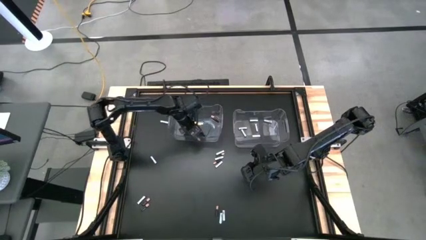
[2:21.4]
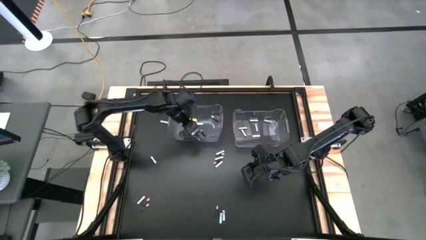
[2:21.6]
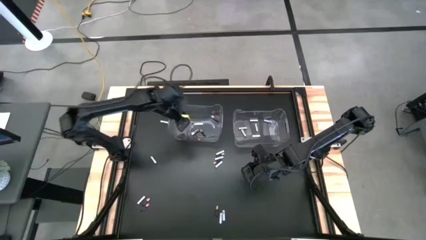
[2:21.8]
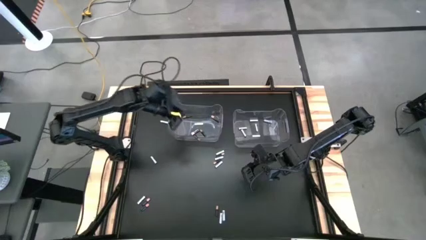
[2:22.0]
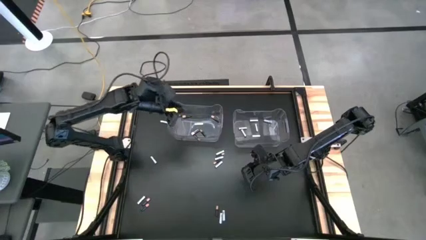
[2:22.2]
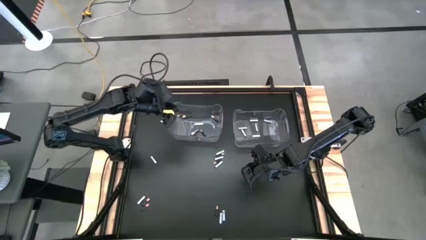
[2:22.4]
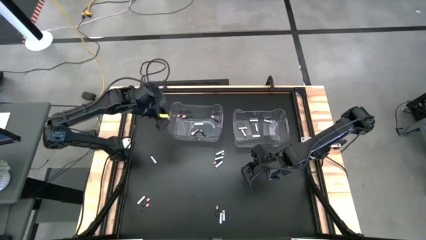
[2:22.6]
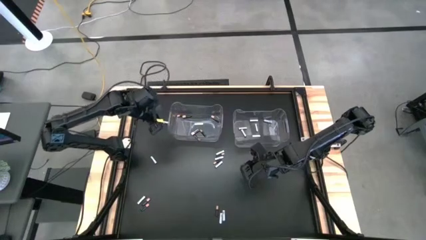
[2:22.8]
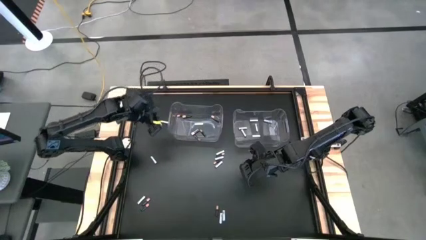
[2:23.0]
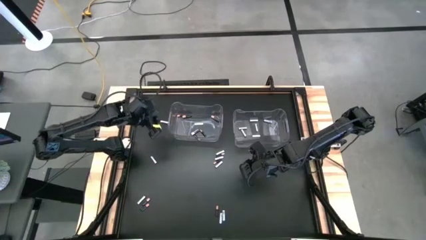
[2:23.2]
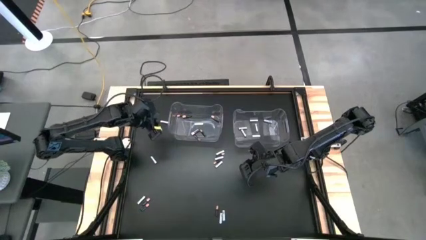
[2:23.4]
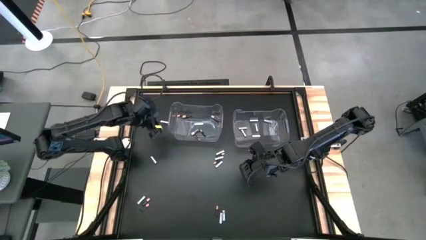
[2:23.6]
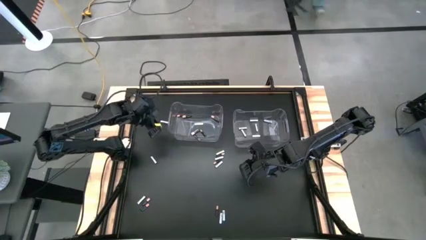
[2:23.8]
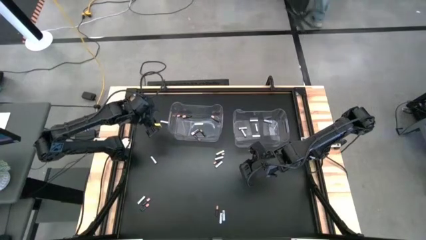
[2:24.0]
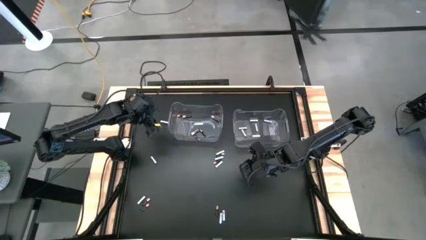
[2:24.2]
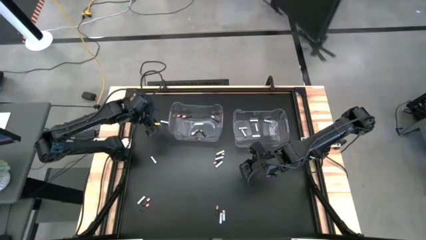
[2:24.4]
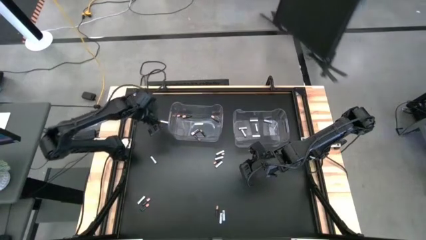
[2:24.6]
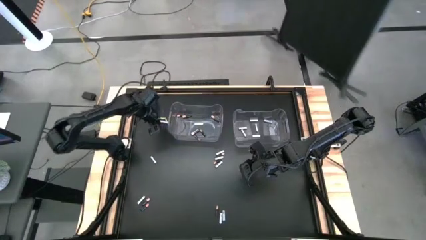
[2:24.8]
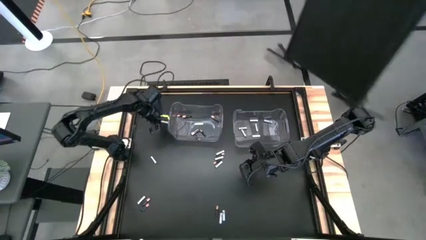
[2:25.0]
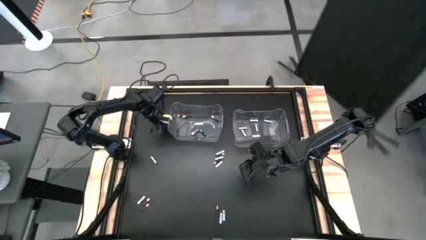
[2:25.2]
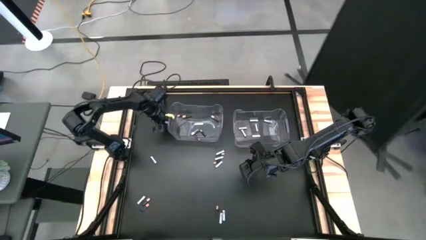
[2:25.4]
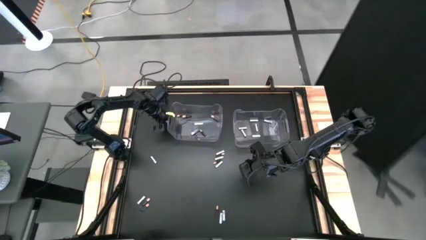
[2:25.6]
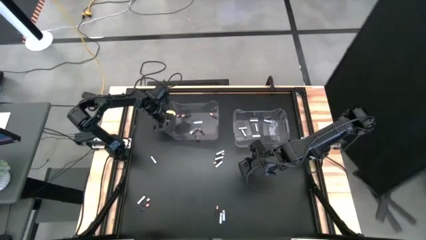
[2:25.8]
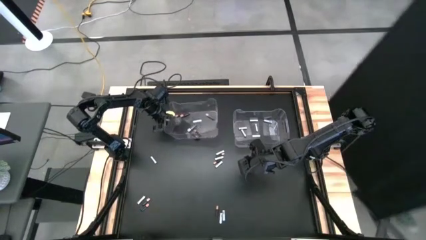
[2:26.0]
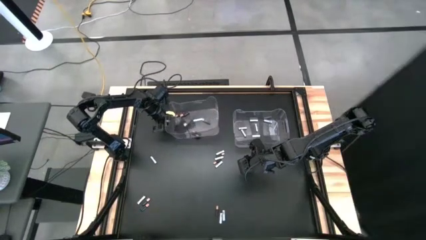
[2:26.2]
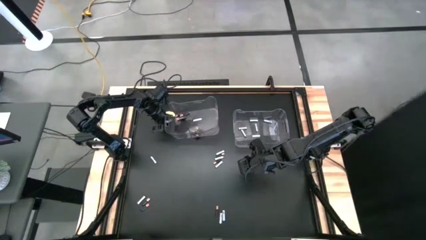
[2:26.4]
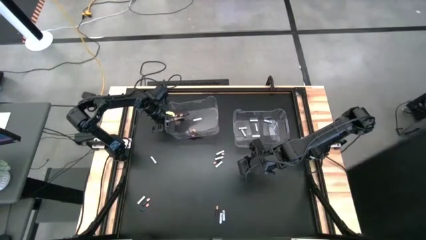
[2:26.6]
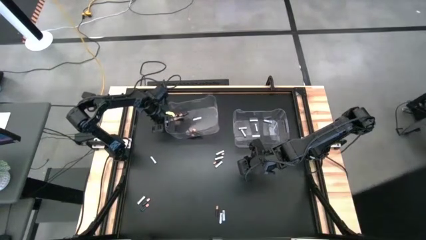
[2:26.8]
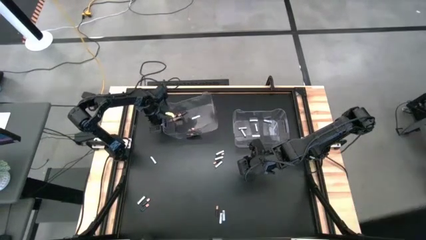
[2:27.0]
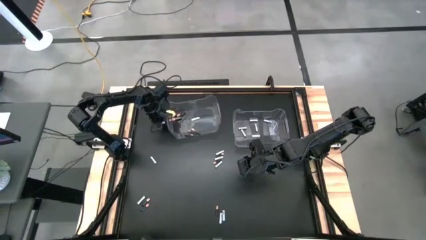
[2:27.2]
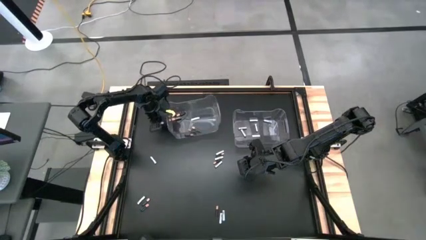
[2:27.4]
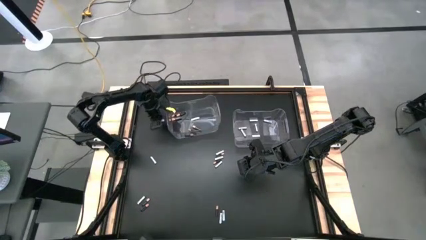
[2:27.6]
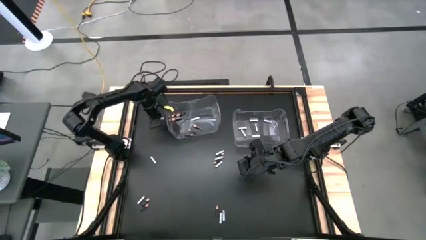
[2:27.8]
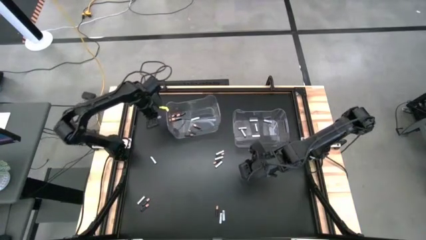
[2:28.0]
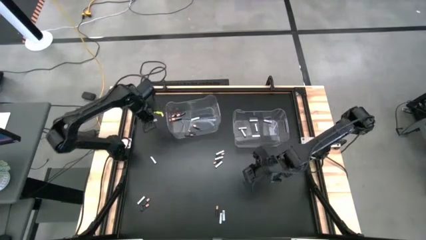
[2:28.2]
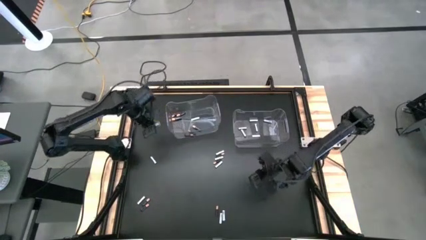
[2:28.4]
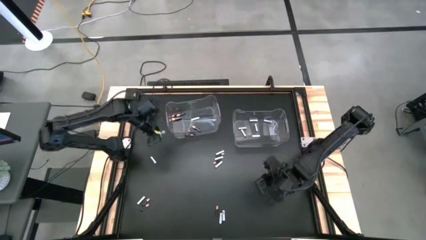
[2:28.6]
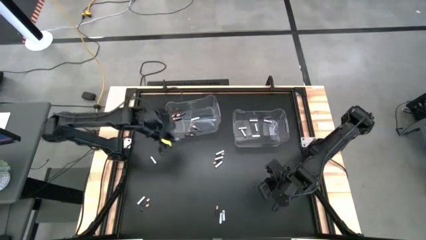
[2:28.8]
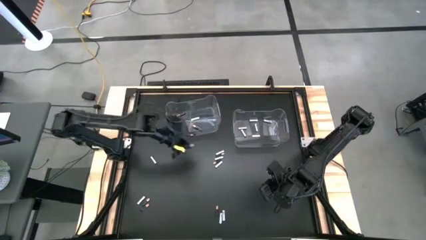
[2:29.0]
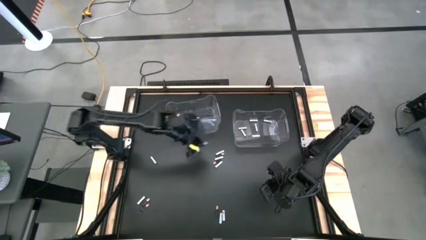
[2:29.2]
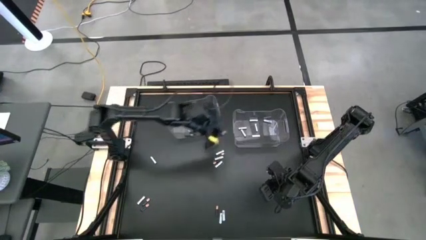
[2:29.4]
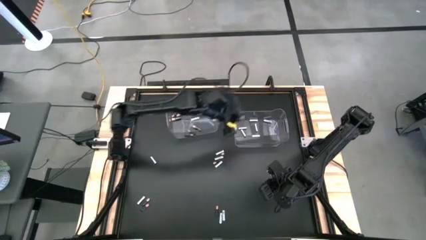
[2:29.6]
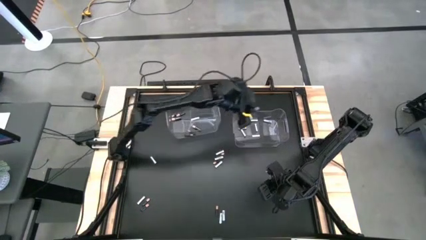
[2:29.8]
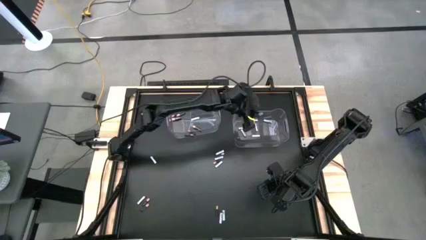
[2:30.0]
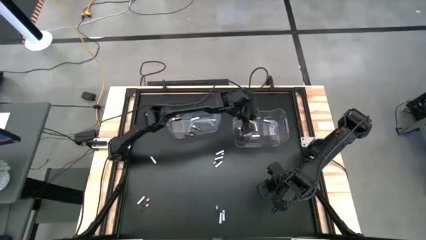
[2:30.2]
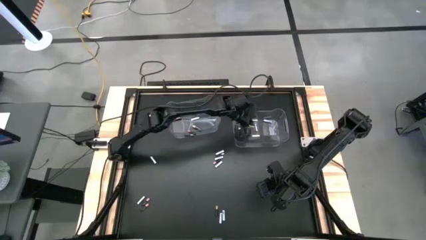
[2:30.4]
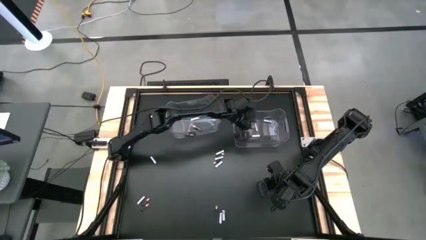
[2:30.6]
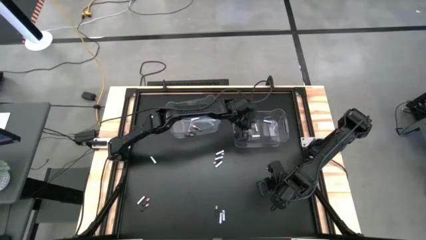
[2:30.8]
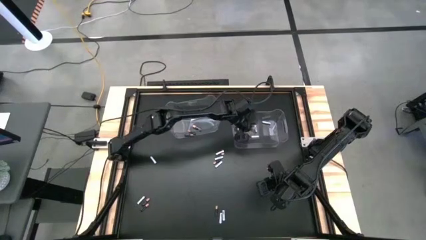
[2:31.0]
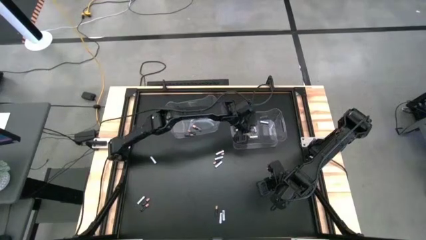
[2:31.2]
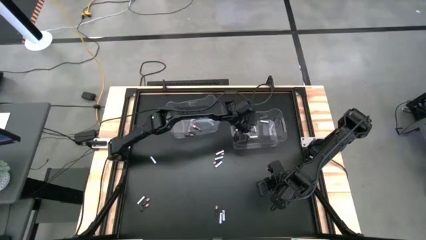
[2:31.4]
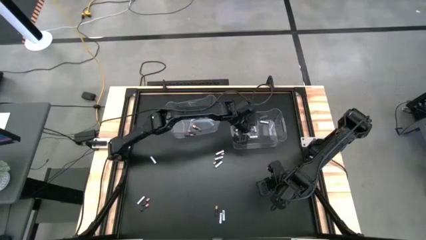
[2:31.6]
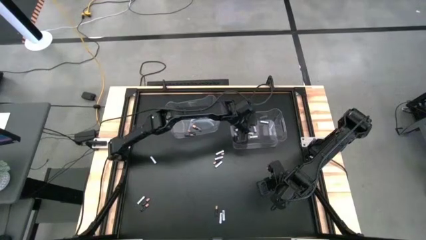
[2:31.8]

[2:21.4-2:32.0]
Task: Sort batteries
Put the white battery into the right transparent bin

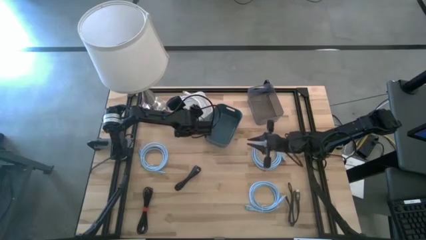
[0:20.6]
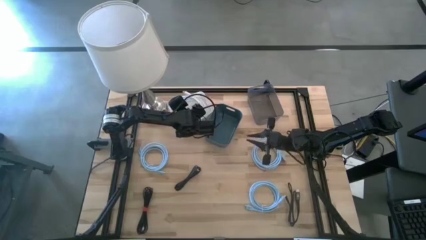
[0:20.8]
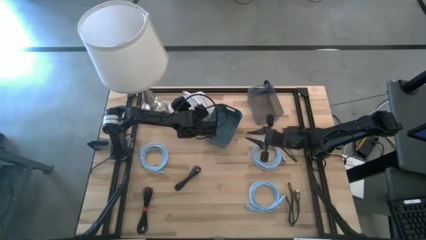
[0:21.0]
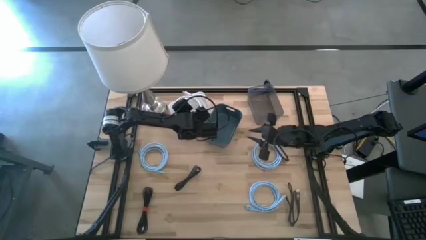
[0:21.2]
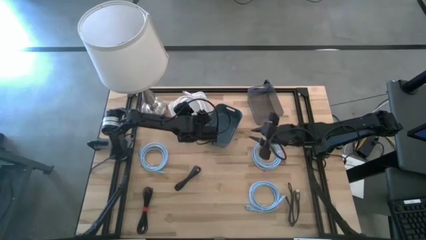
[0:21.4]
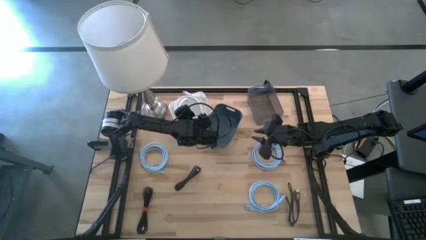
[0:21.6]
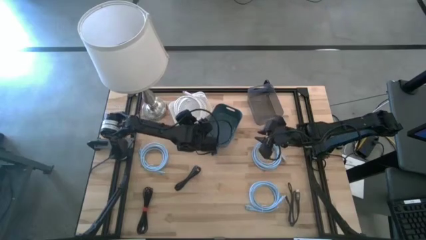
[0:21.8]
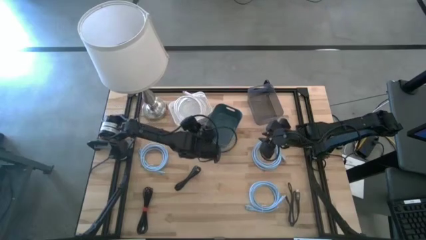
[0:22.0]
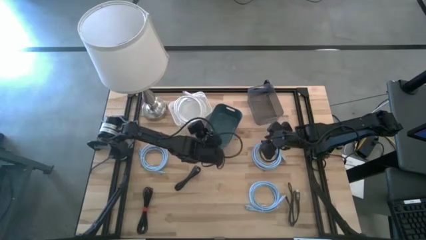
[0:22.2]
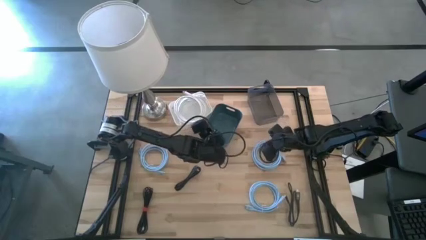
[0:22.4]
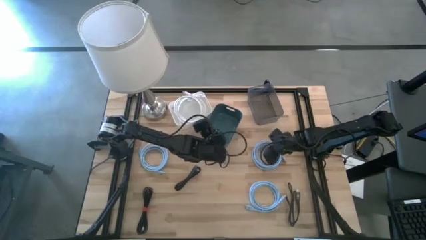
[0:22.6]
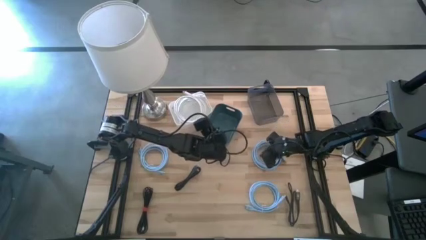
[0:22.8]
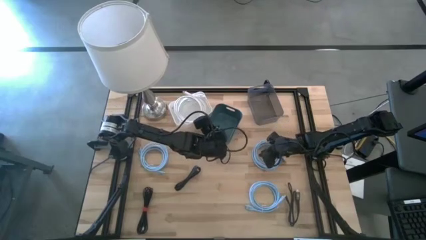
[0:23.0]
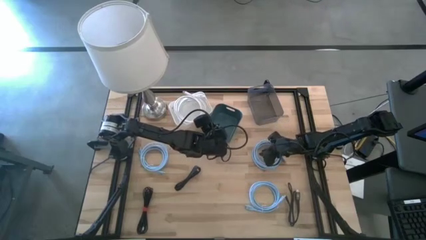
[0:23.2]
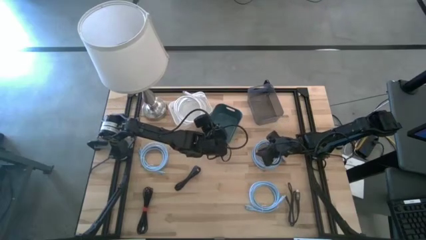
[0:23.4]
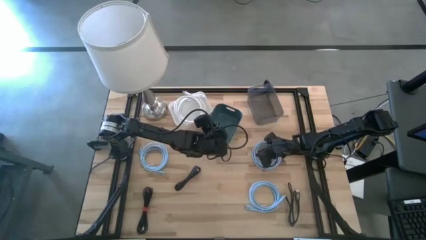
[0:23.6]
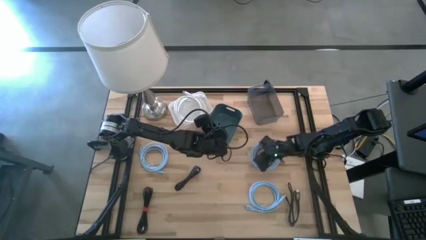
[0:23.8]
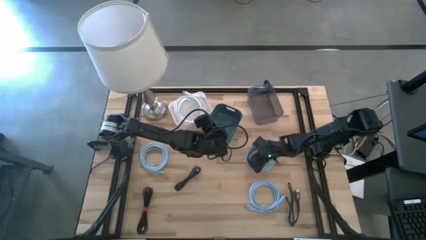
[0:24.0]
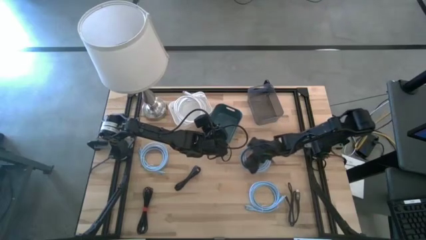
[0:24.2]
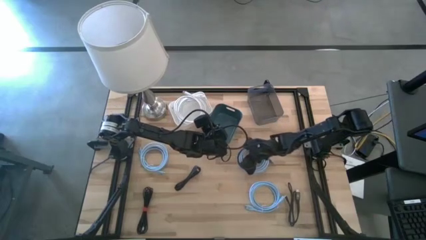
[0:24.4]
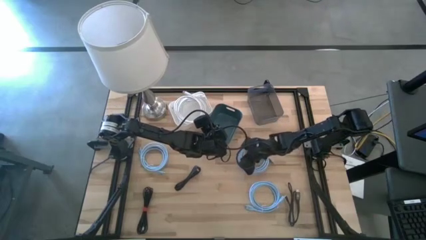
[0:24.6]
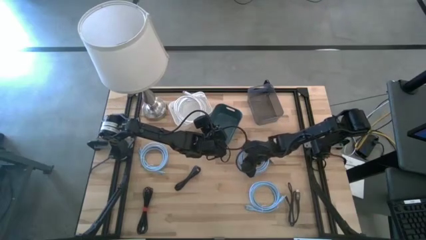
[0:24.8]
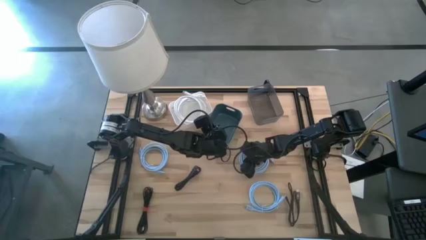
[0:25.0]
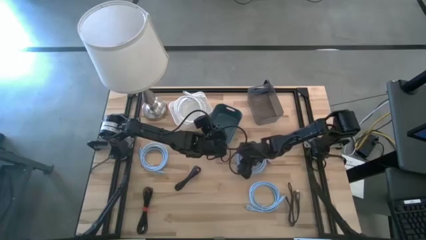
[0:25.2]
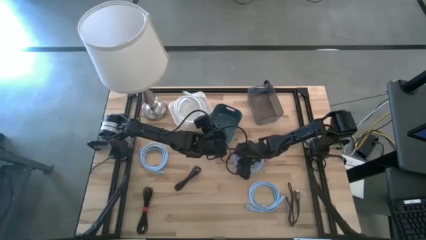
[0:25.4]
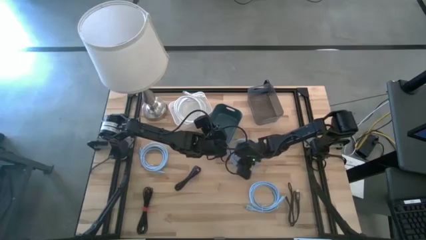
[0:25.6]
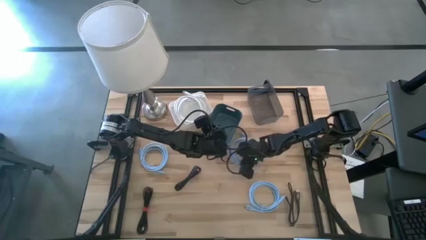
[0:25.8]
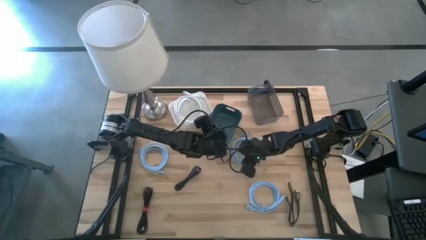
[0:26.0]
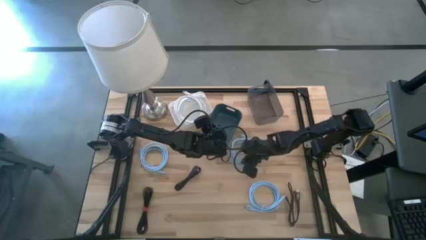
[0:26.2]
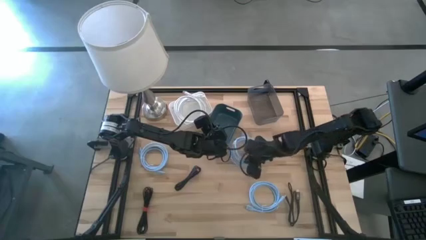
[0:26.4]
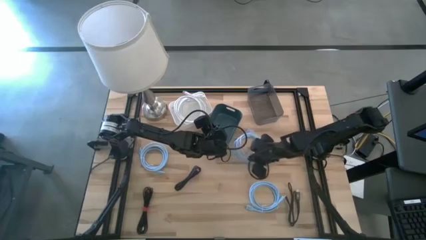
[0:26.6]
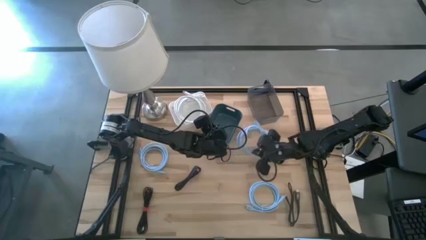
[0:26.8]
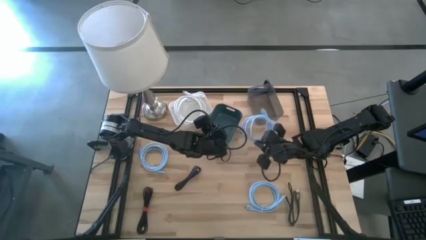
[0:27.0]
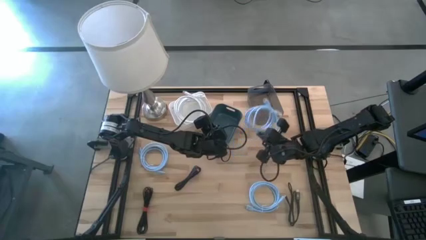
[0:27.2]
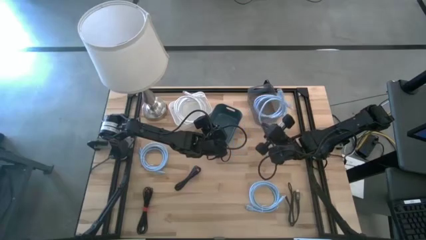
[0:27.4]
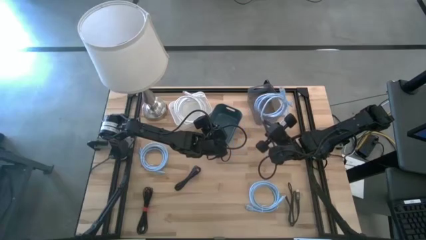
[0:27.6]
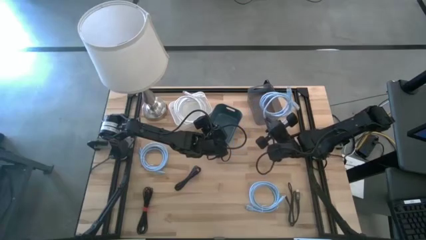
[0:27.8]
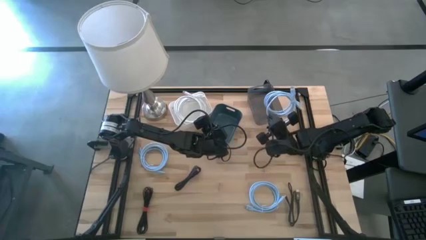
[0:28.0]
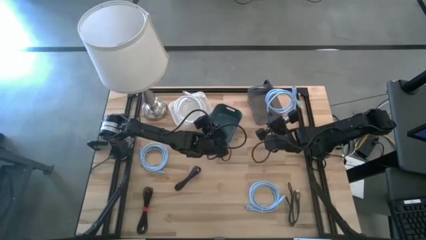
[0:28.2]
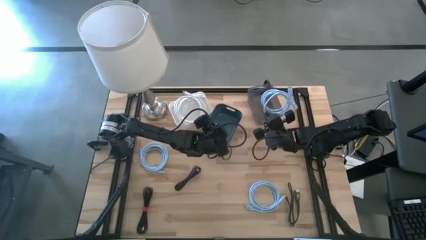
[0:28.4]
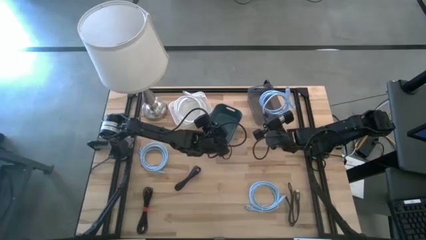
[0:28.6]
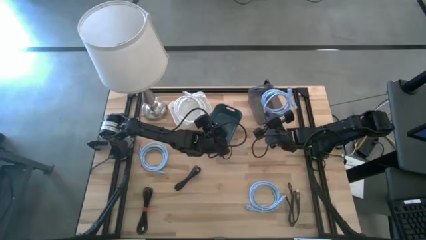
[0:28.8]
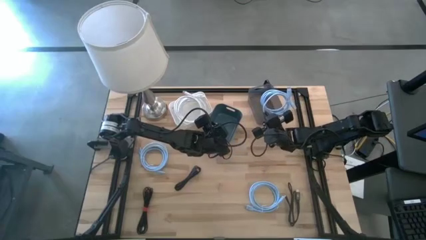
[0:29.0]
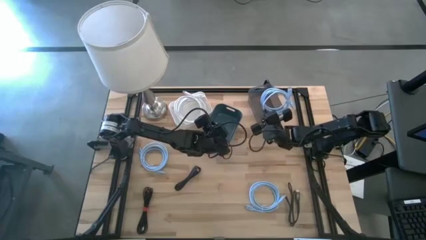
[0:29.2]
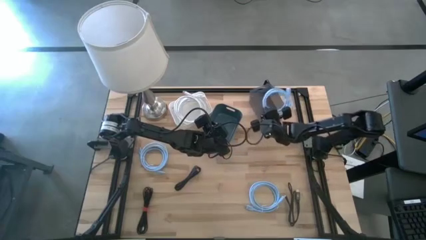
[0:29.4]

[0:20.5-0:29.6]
Task: Sort HDMI cables
Put the top right blue HDMI cable into the black bin
